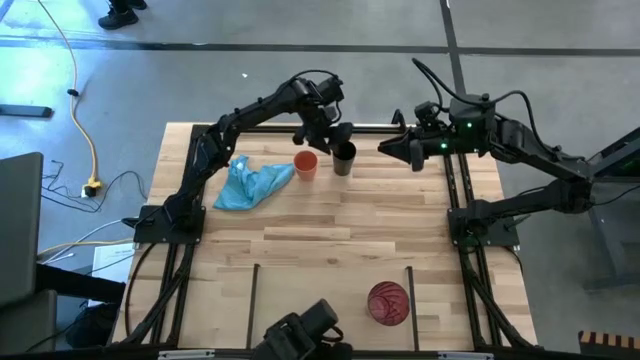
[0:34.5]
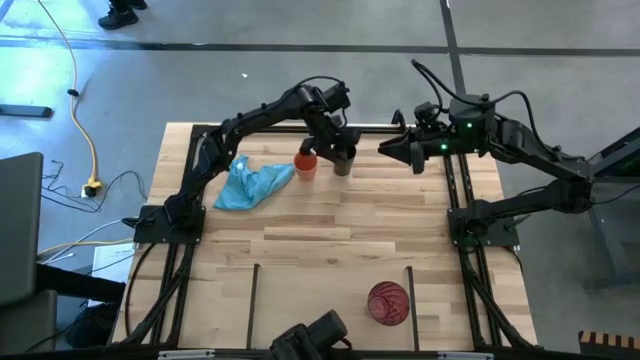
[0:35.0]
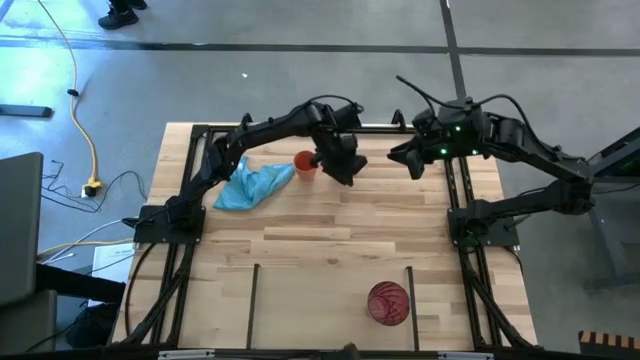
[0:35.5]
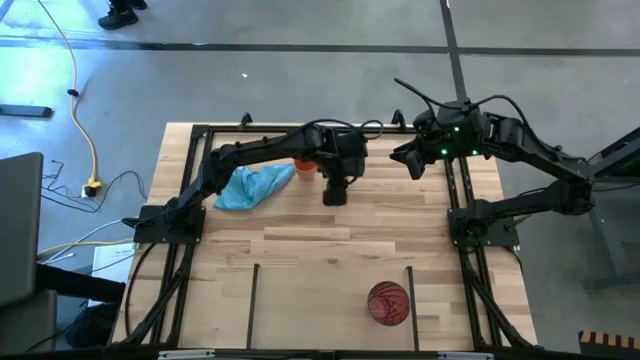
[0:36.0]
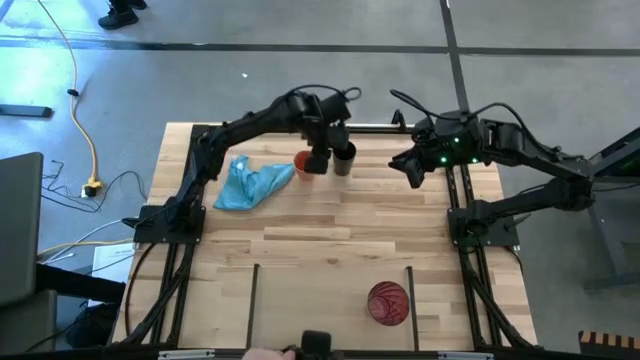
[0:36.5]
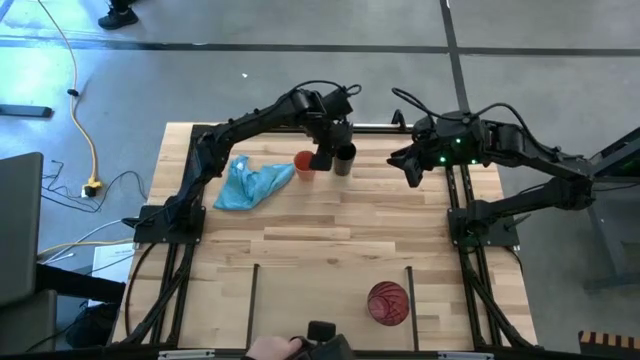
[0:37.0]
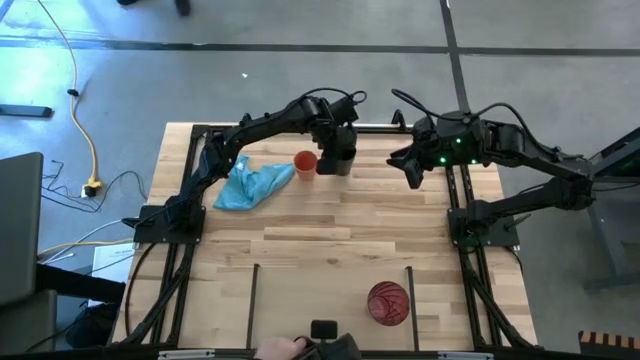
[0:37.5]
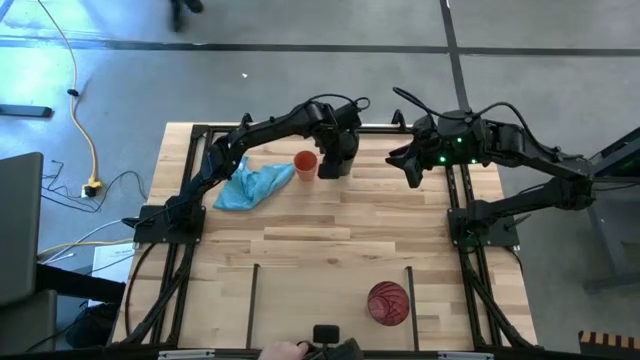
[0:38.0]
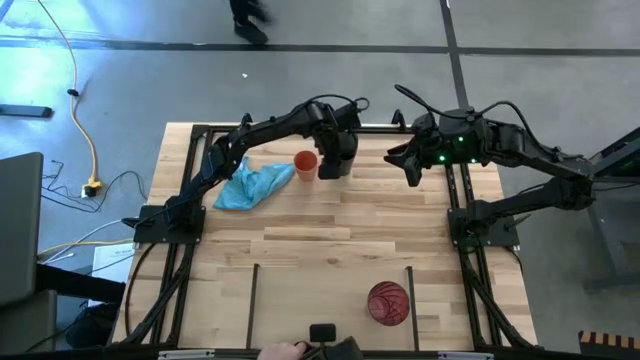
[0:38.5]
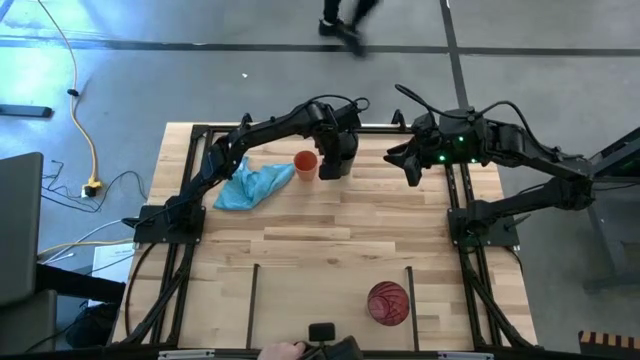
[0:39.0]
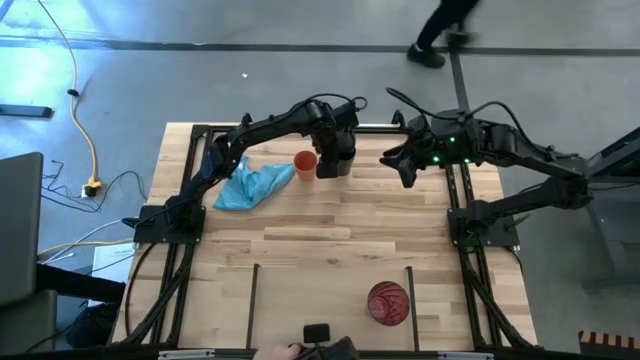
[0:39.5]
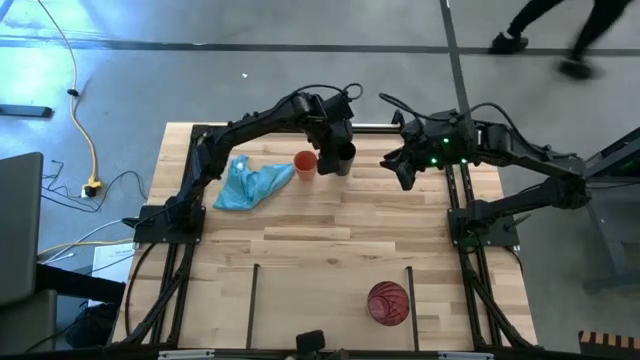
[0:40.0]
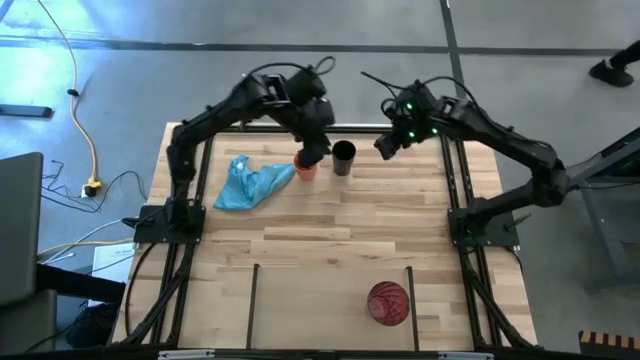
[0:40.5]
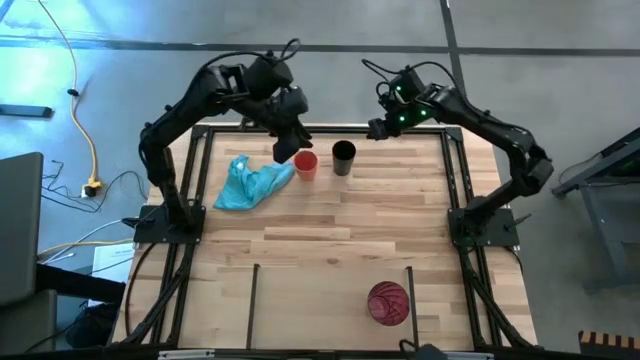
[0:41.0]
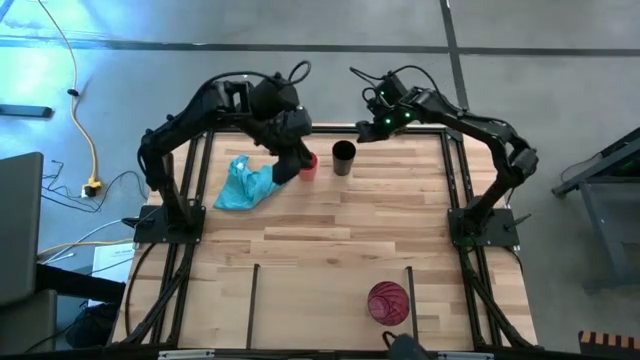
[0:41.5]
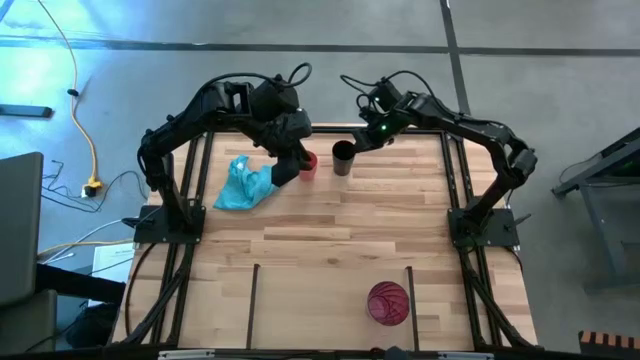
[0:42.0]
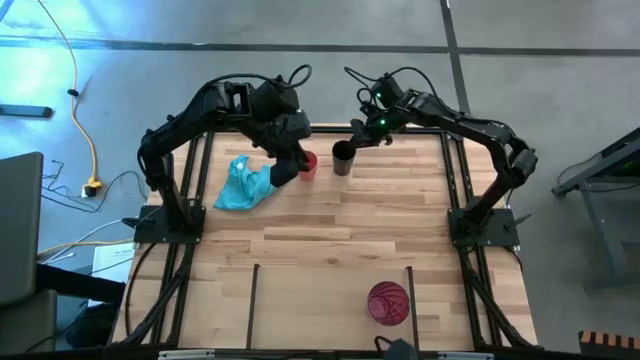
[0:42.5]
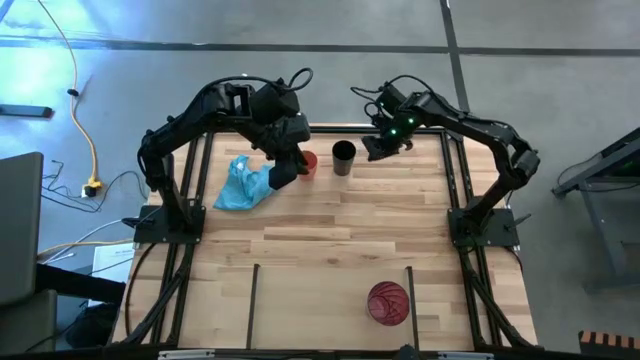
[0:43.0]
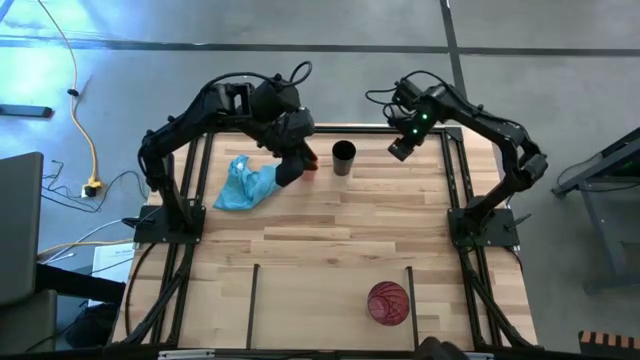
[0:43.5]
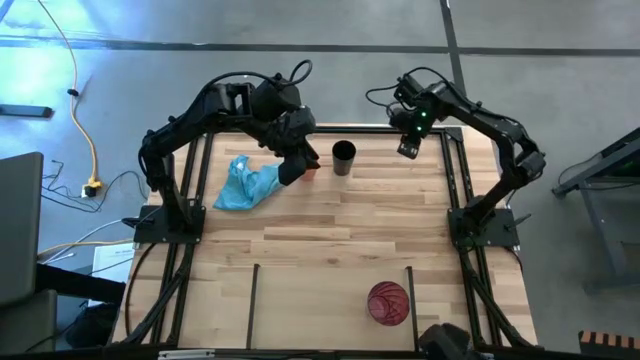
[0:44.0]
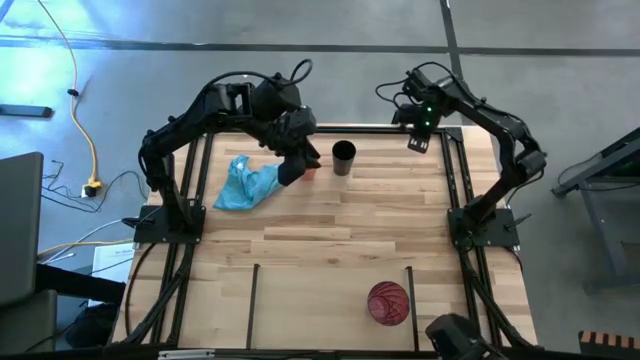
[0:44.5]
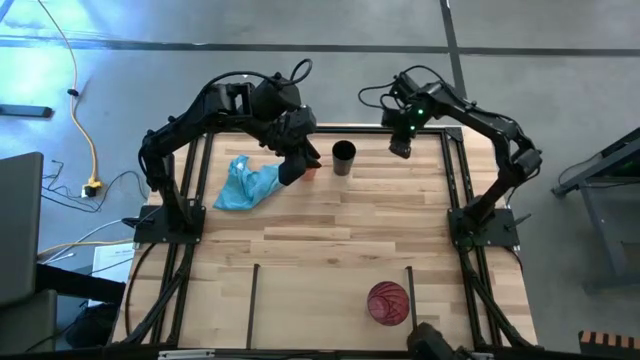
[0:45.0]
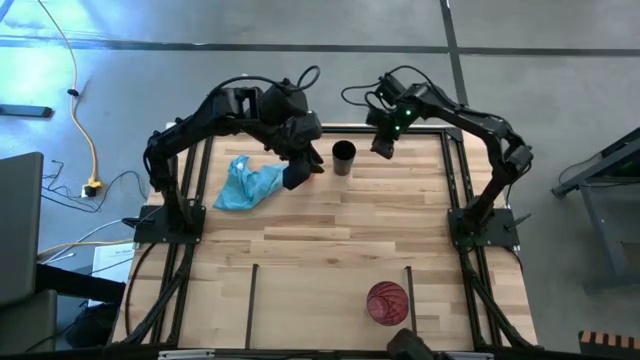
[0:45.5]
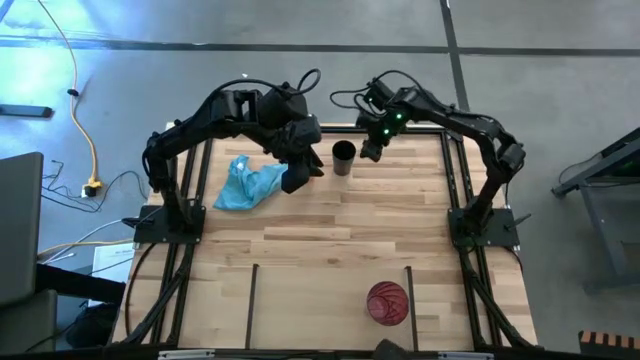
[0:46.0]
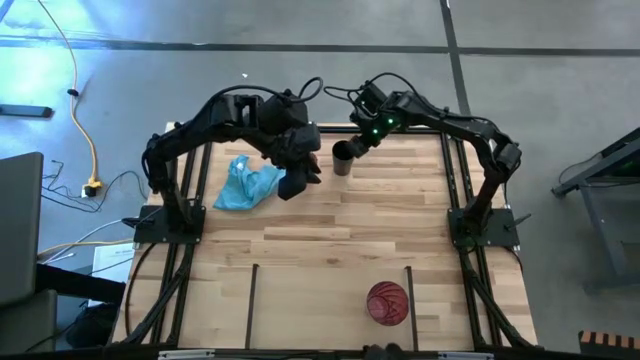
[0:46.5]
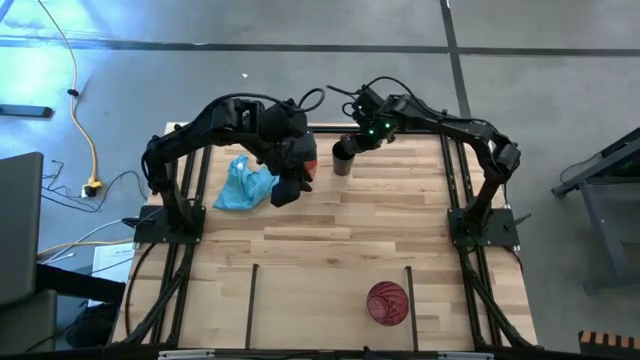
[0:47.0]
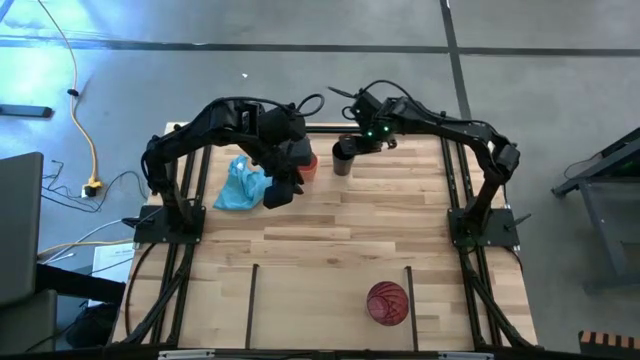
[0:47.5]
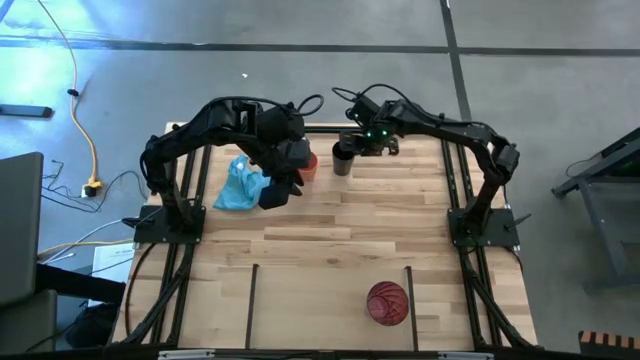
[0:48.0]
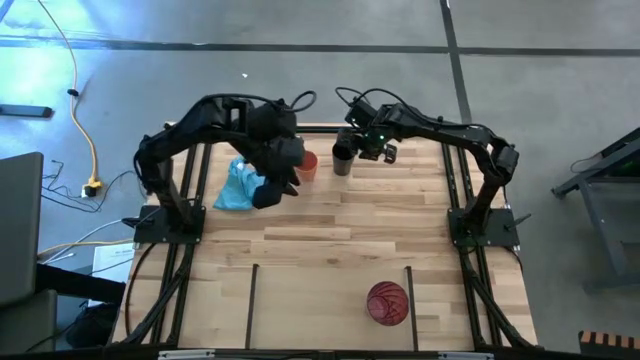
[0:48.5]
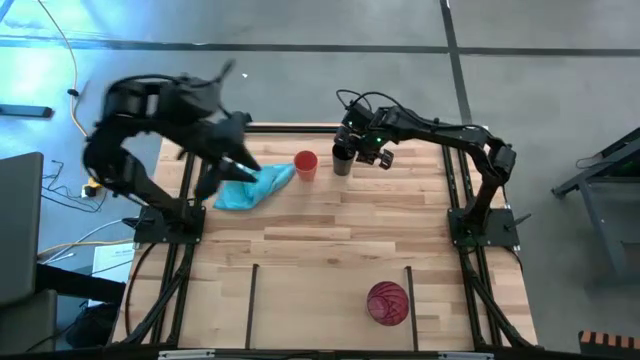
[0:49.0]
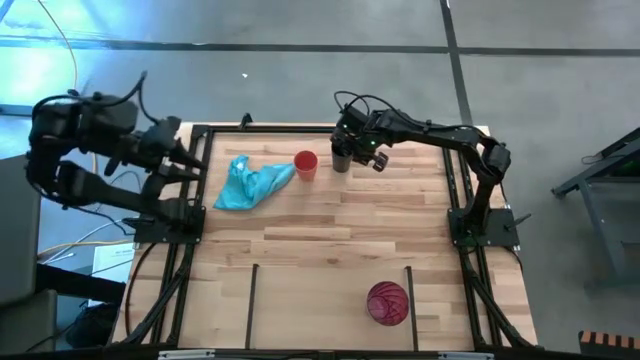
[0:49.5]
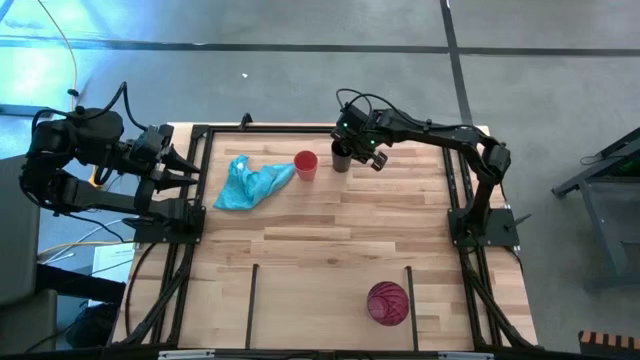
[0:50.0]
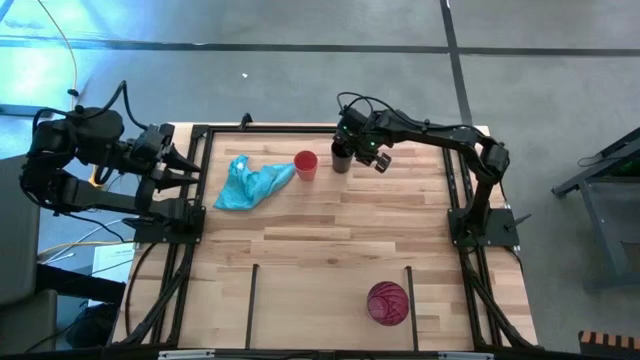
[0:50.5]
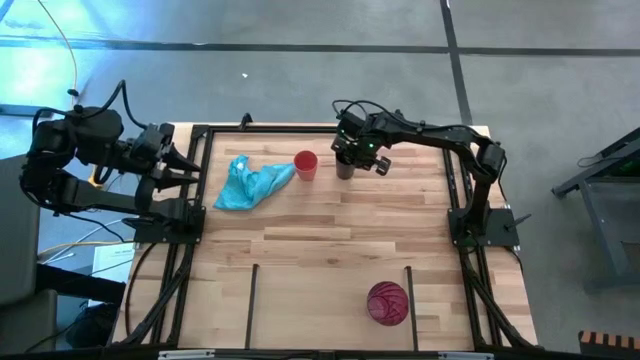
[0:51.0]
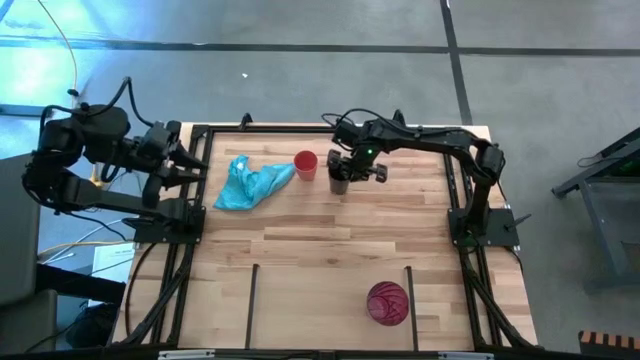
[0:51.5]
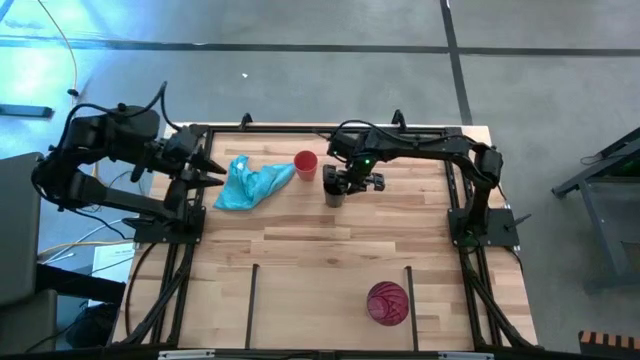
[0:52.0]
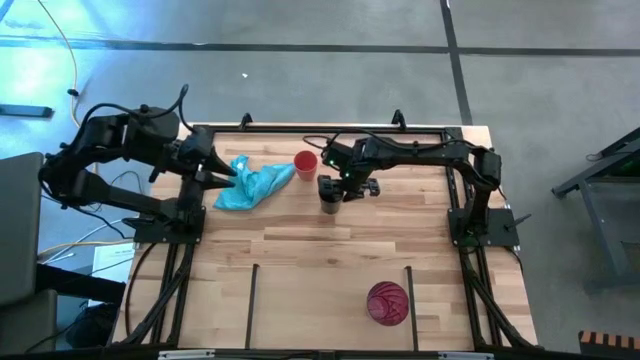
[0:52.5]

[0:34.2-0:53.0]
Task: Stack small to large cups/mugs on shelf
Put the black cup on the shelf

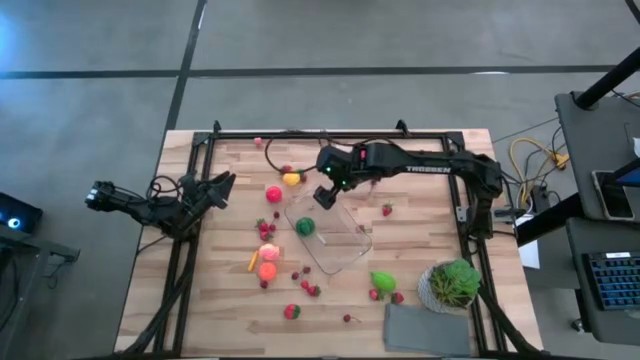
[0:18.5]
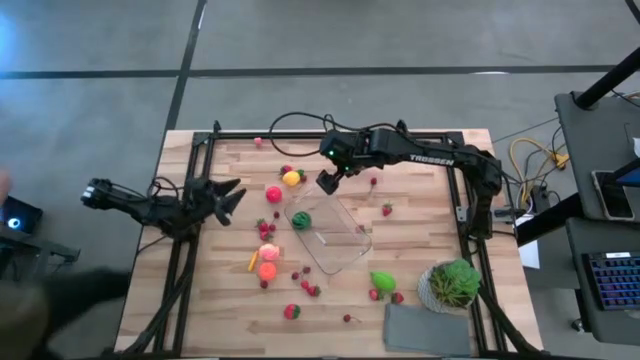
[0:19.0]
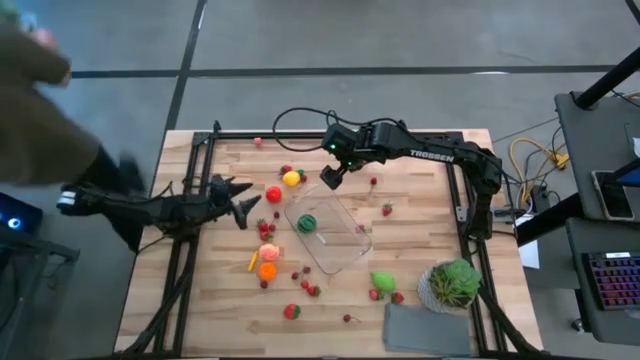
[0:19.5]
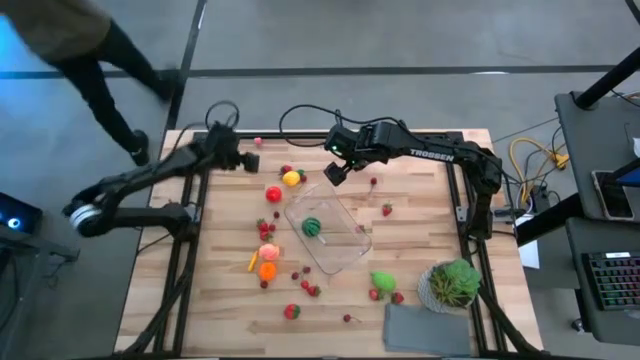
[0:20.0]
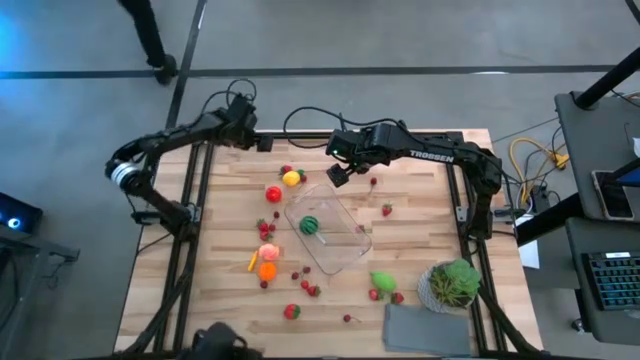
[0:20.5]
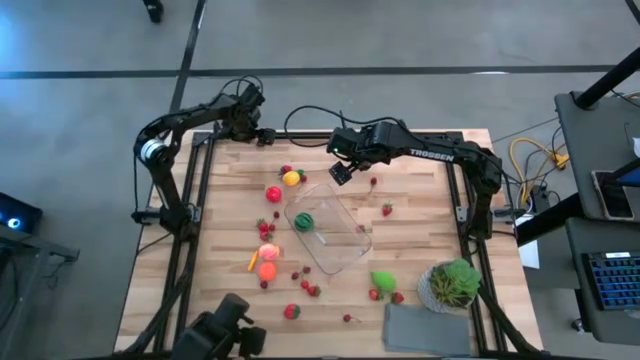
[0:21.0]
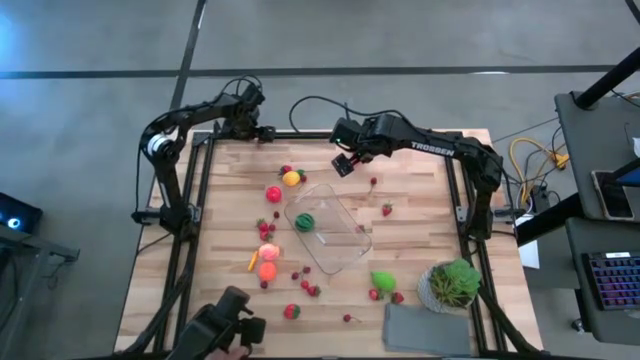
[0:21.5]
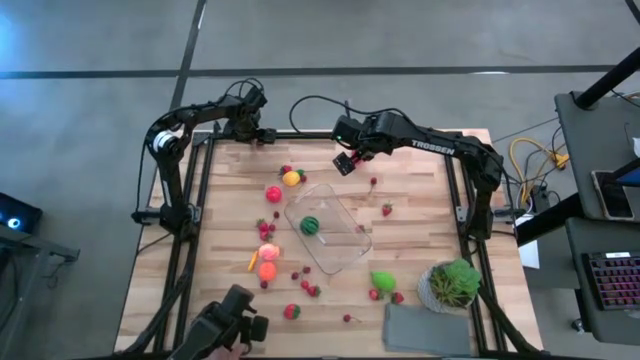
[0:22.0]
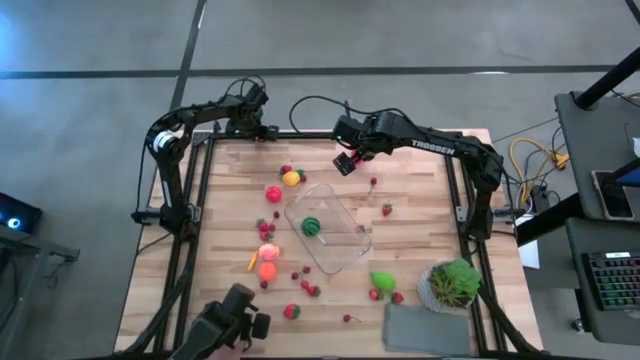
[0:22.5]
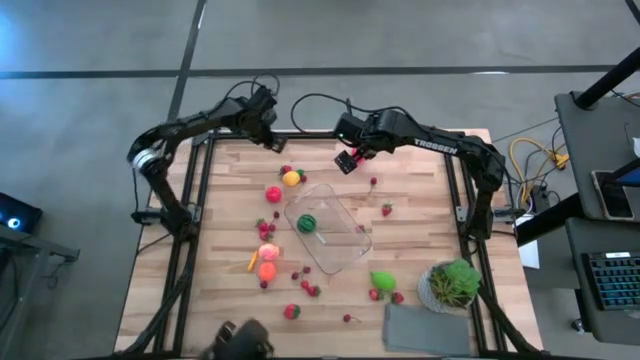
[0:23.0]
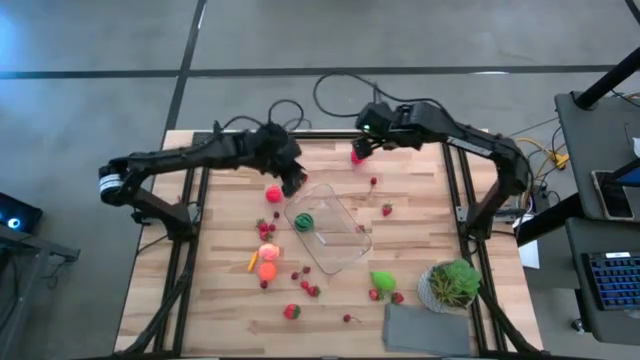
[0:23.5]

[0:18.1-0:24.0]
Task: Pick and placing Produce into tupperware
Put the pink peach into the transparent bin
